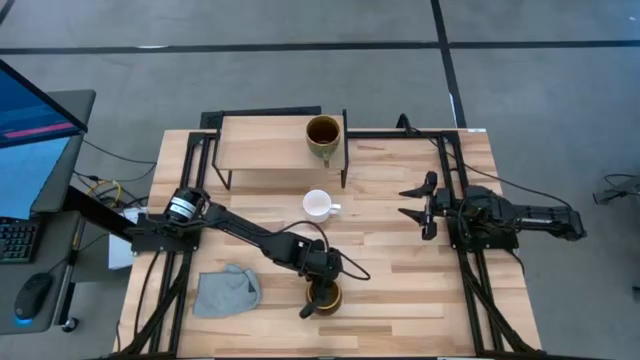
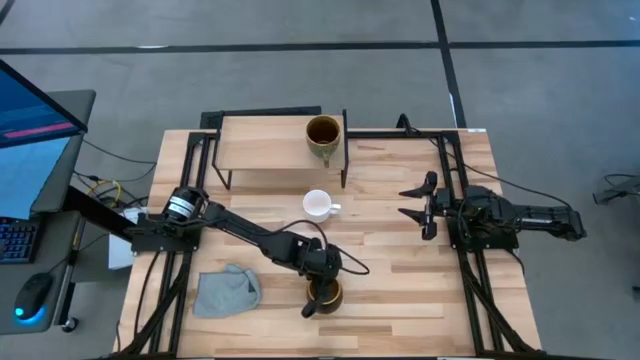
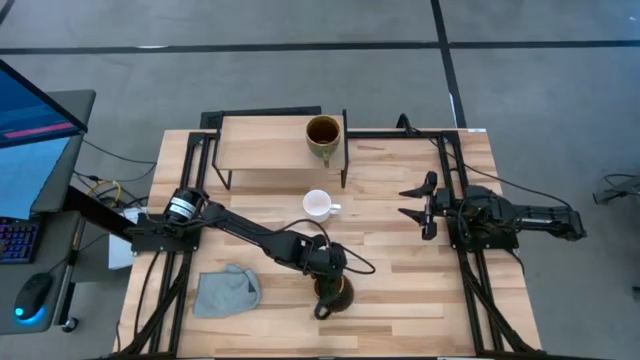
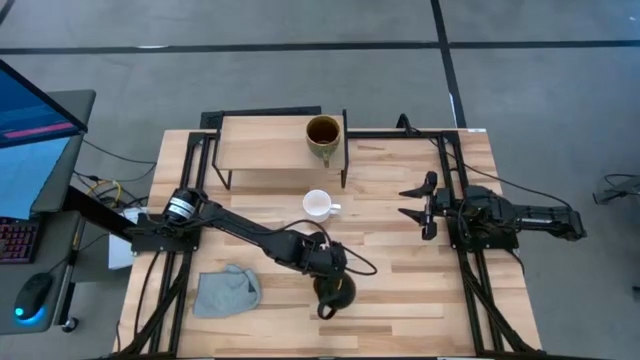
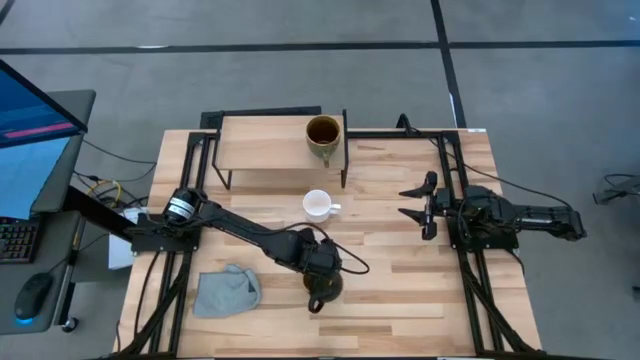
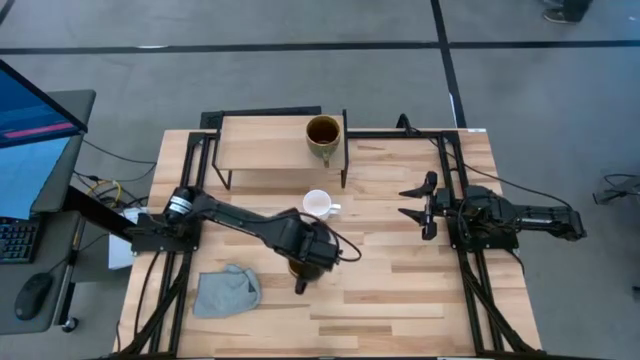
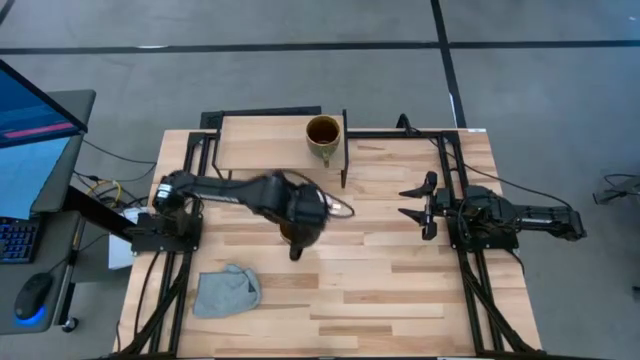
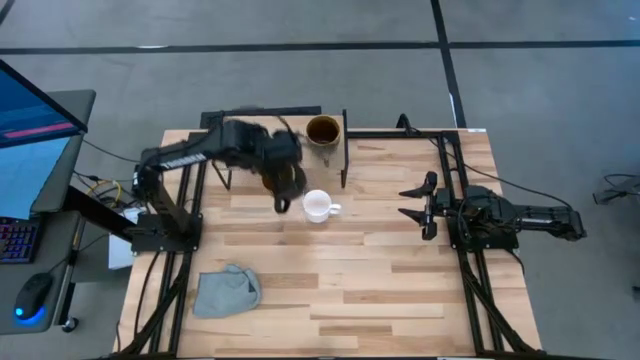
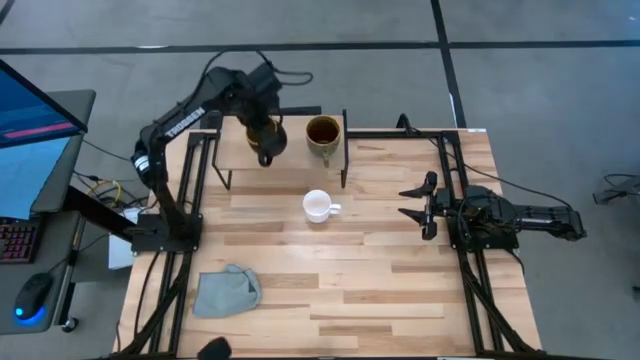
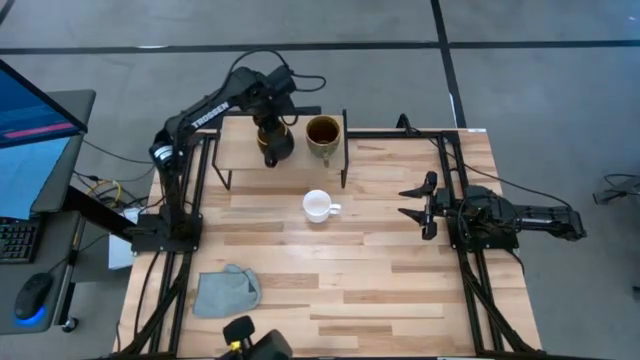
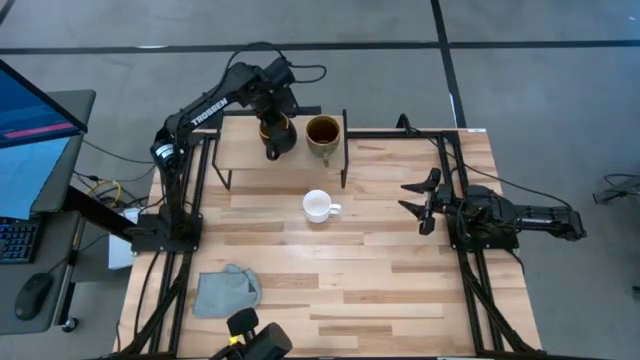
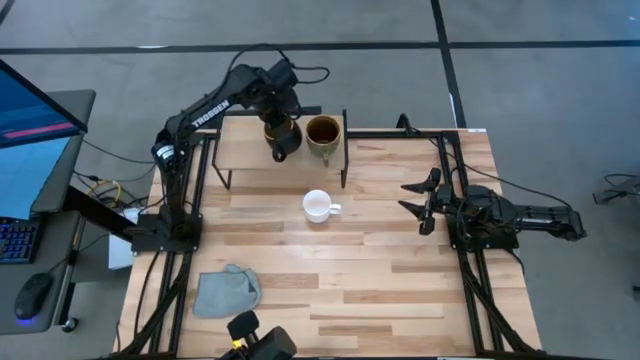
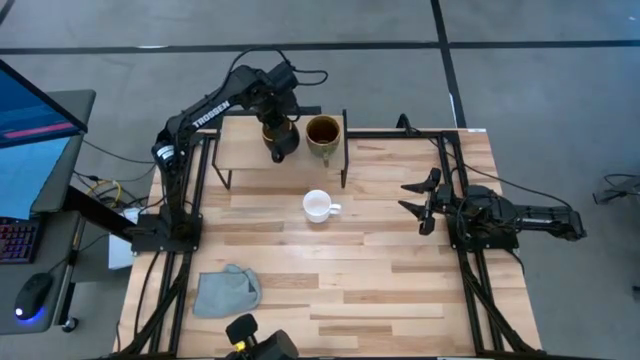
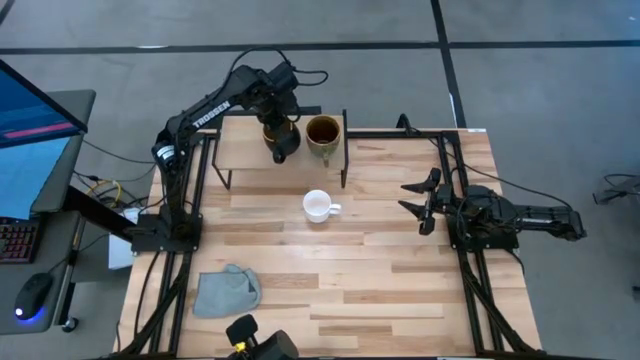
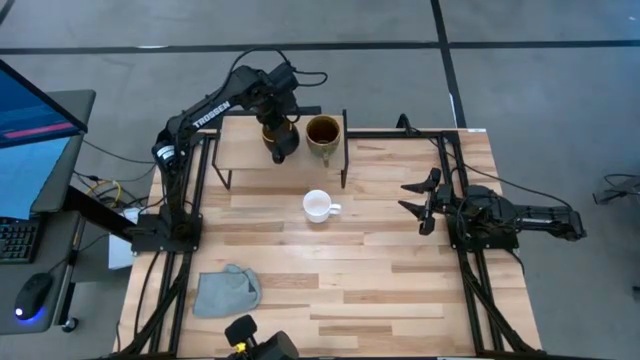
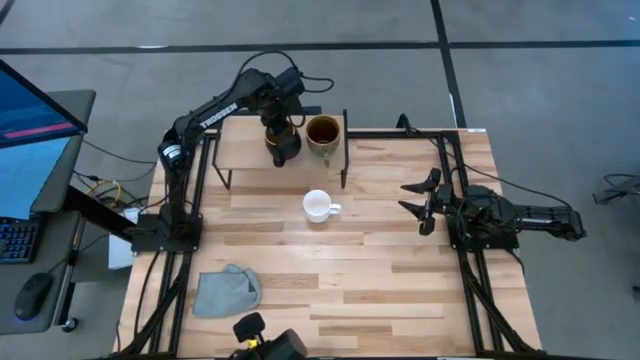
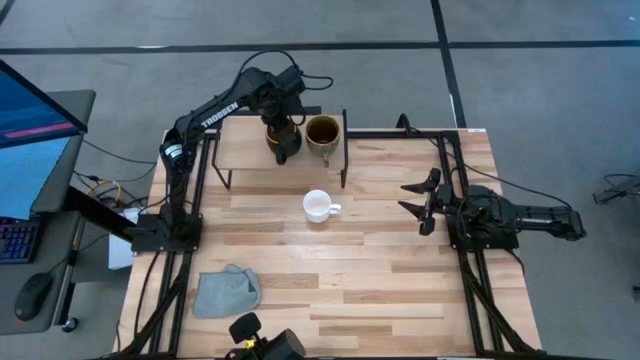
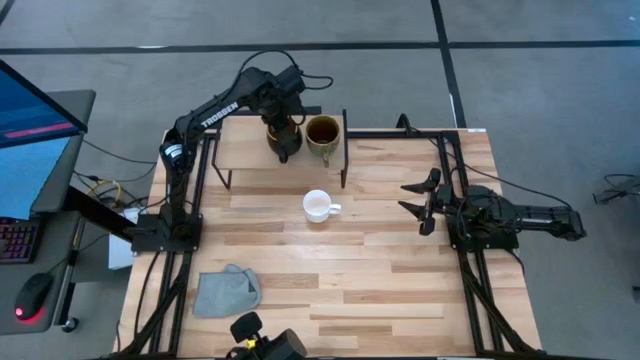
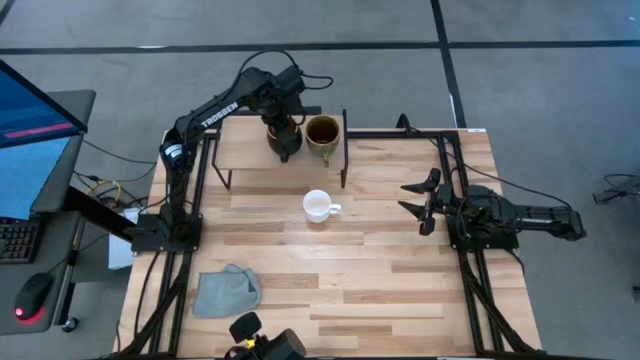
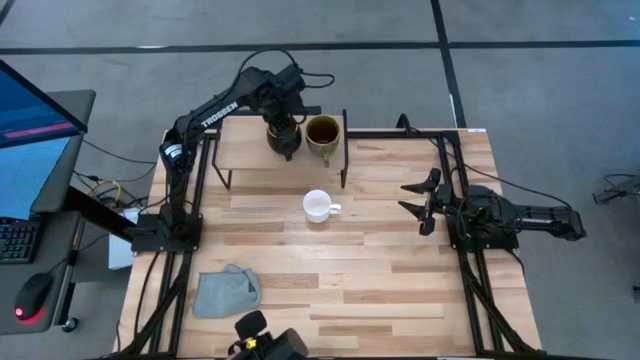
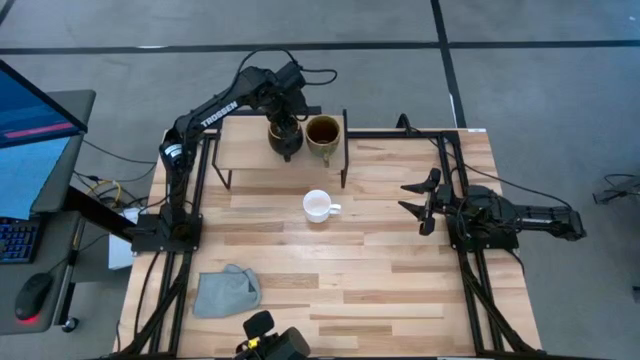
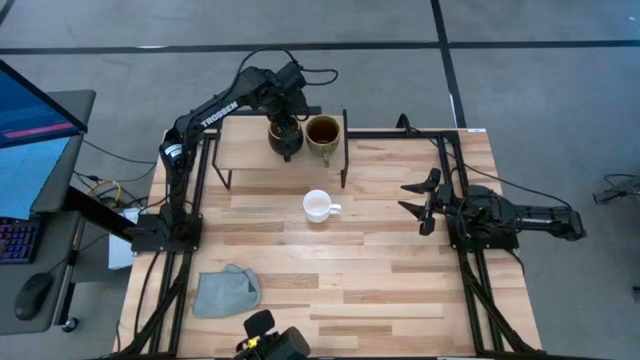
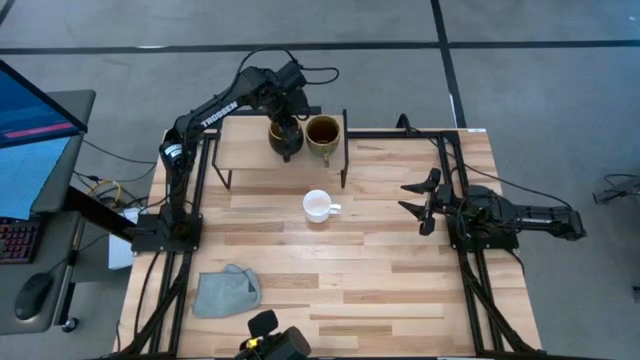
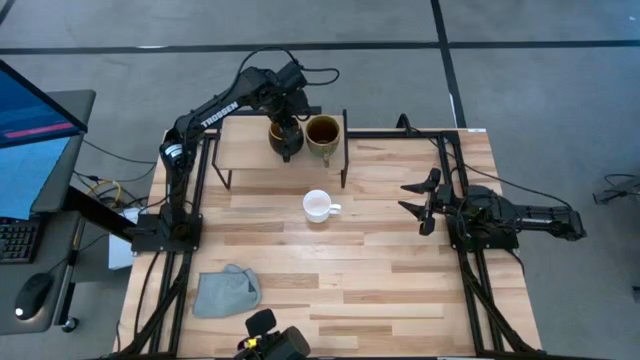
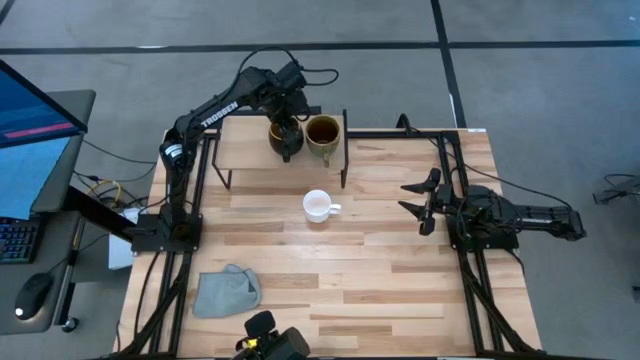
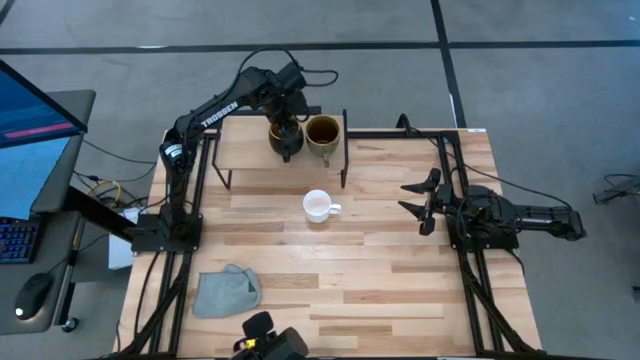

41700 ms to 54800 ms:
Task: Stack small to large cups/mugs on shelf
Put the black yellow mug on the shelf

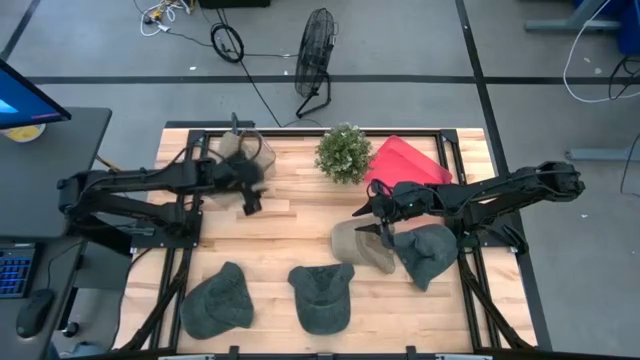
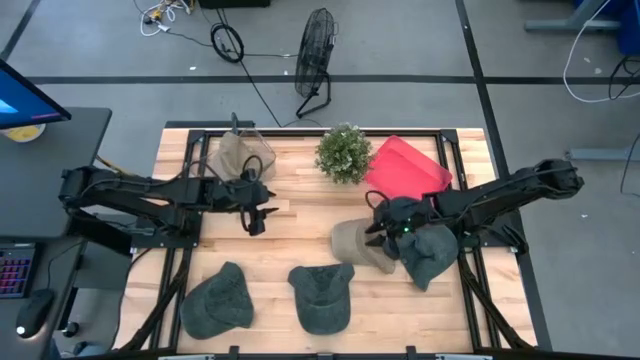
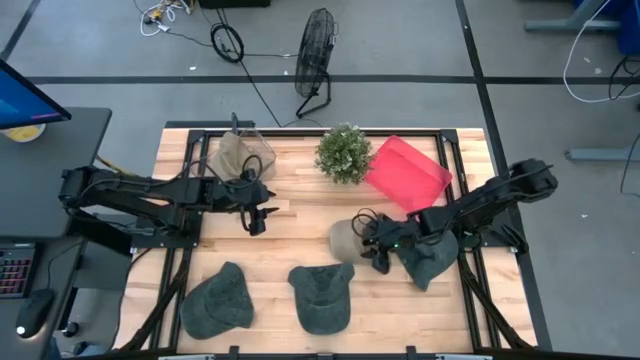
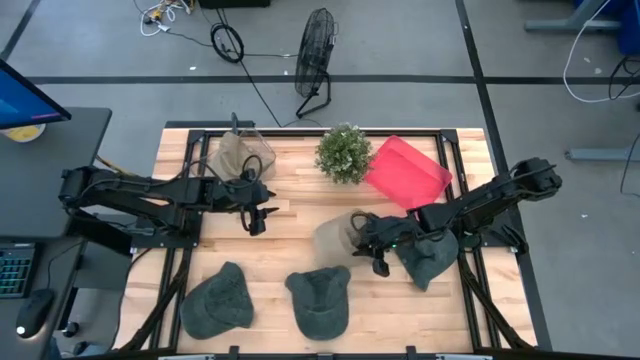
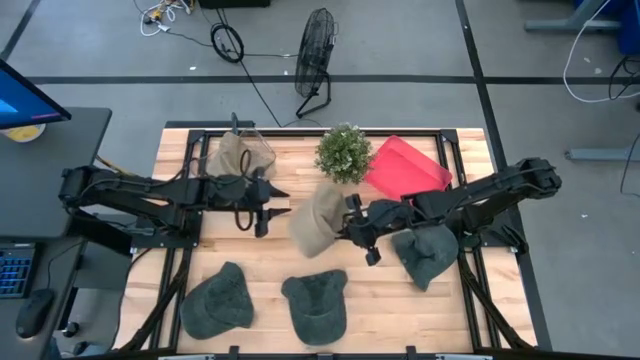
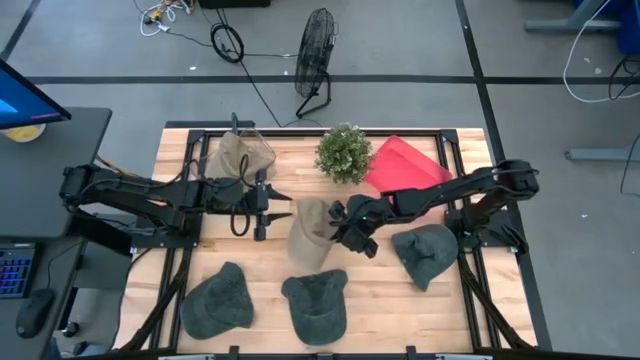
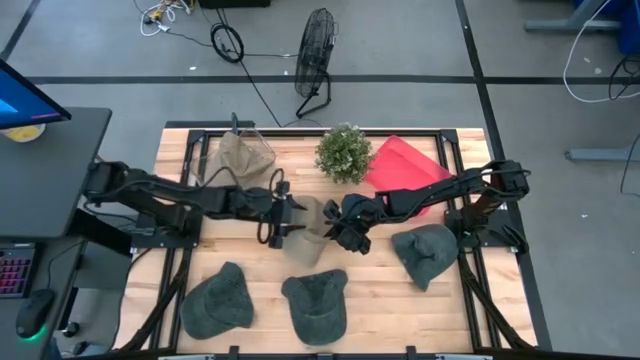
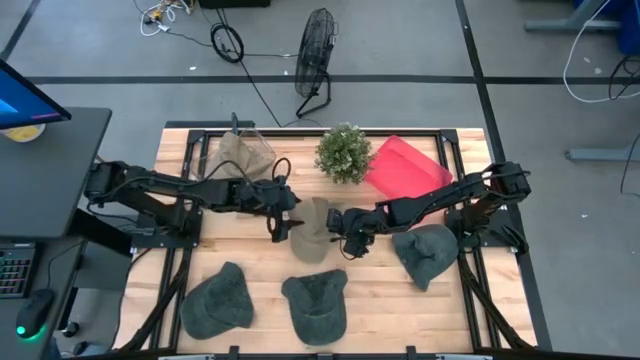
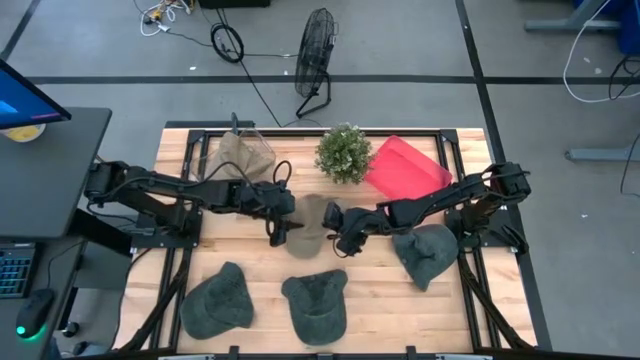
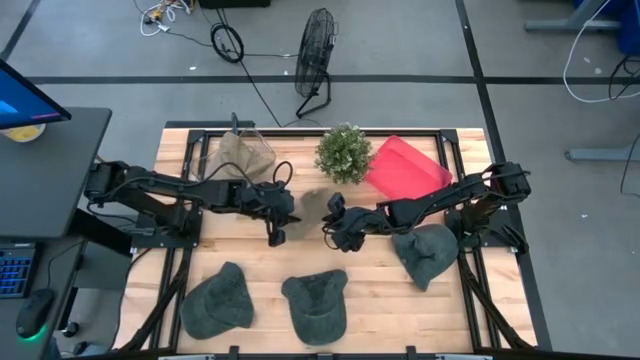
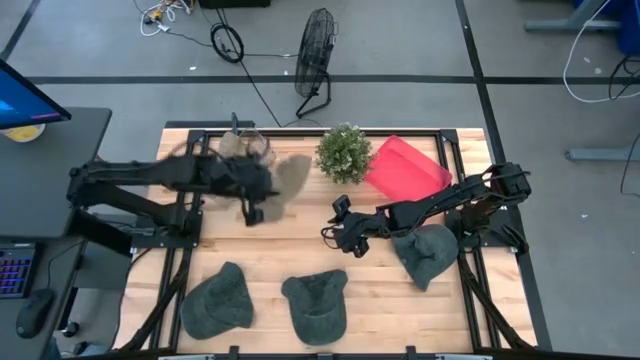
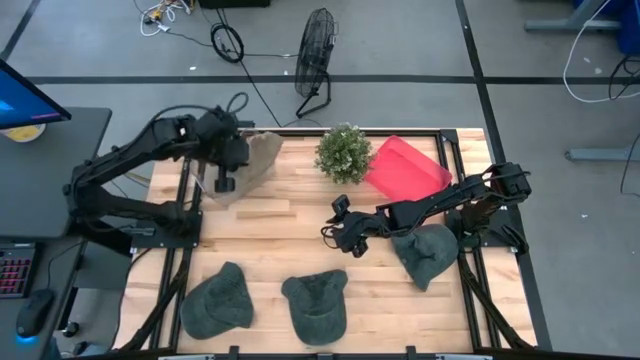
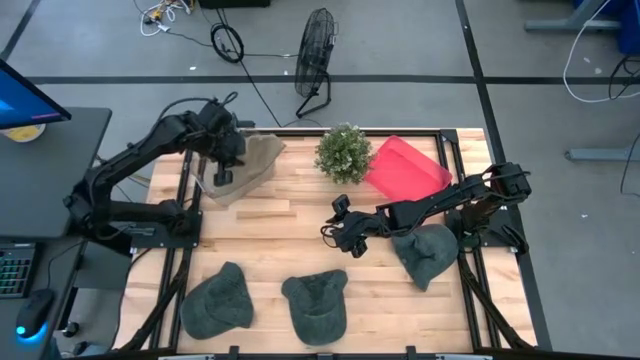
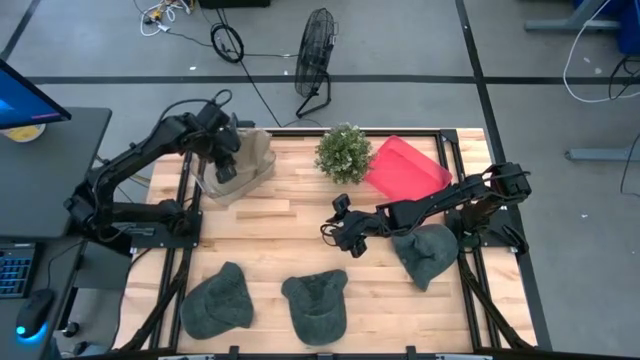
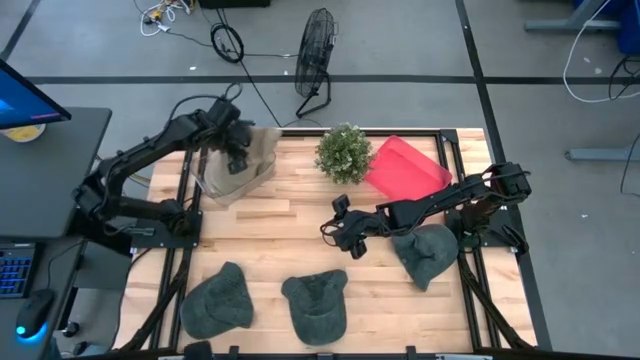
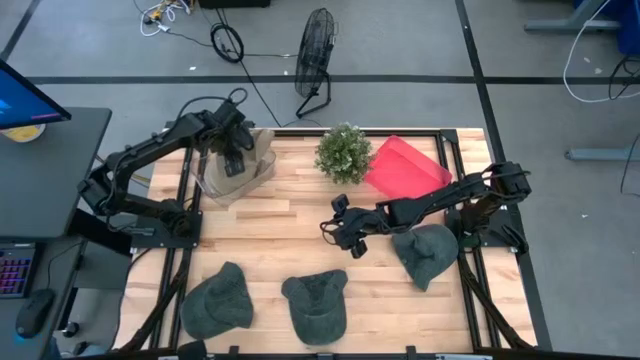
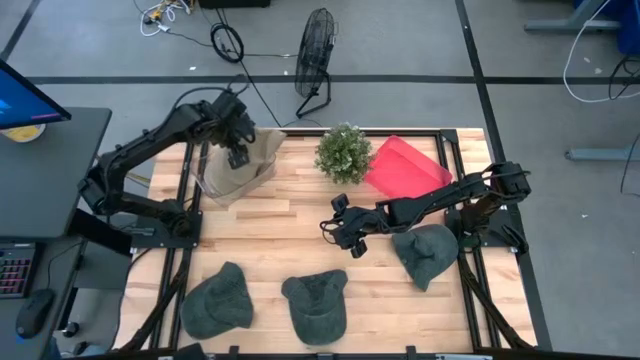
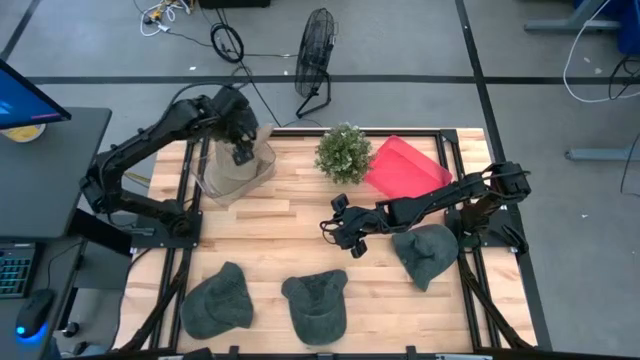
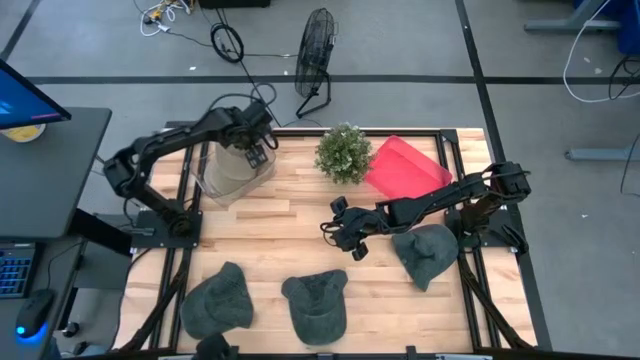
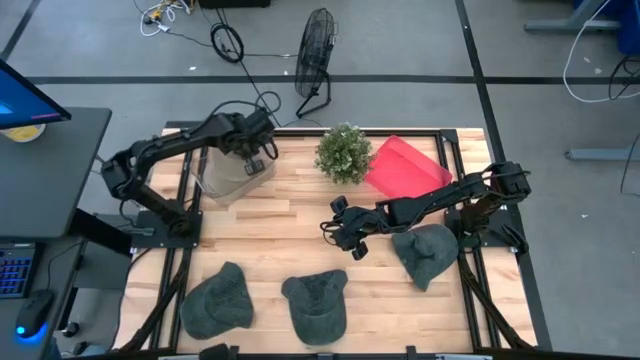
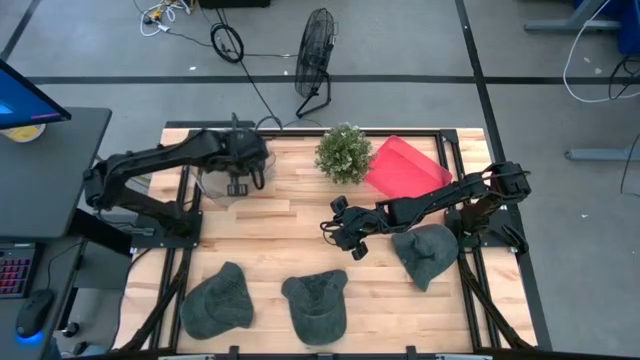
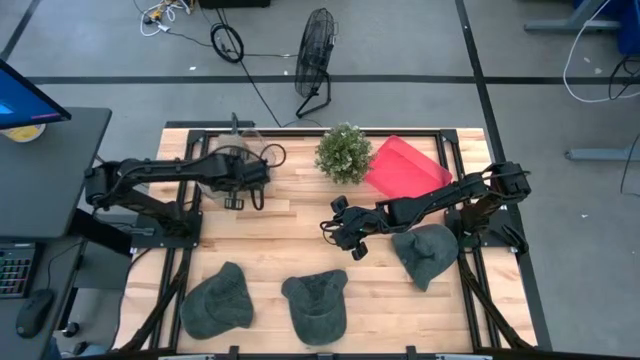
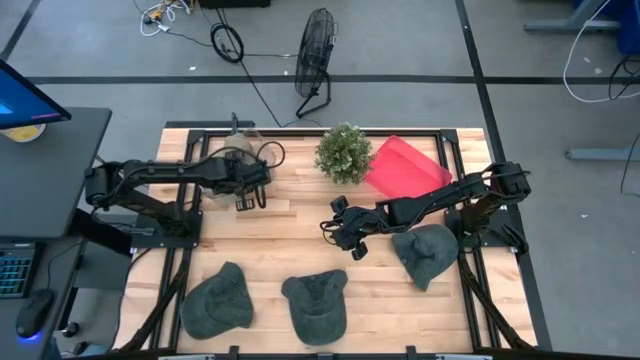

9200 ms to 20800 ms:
Task: Pick & Place hat
Put the brown cap into the transparent bin
